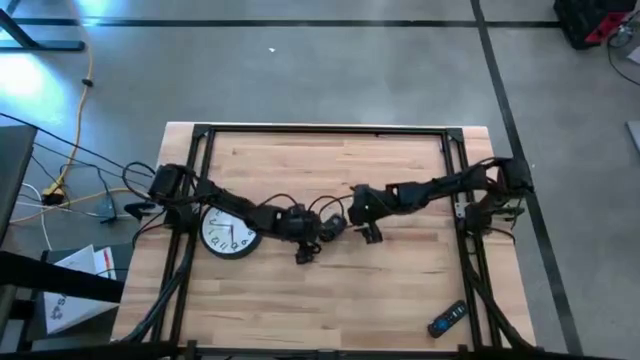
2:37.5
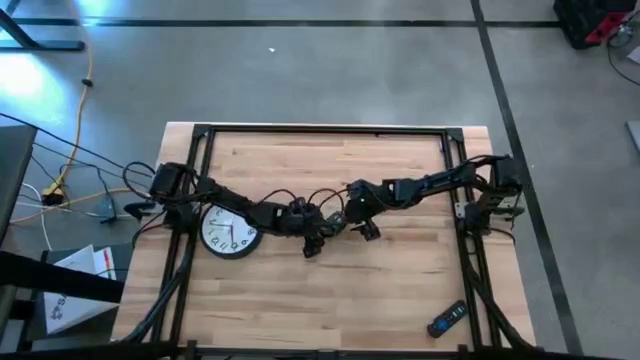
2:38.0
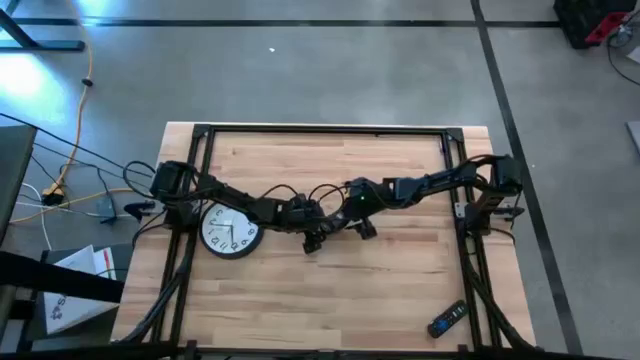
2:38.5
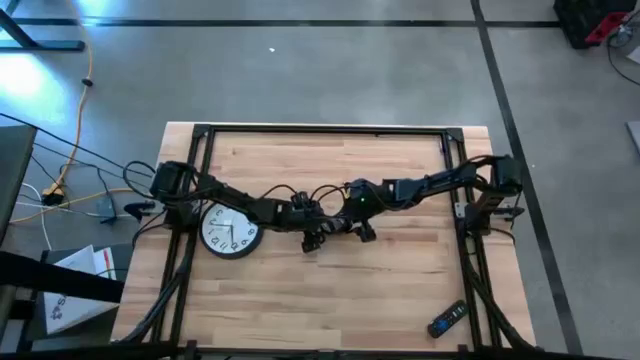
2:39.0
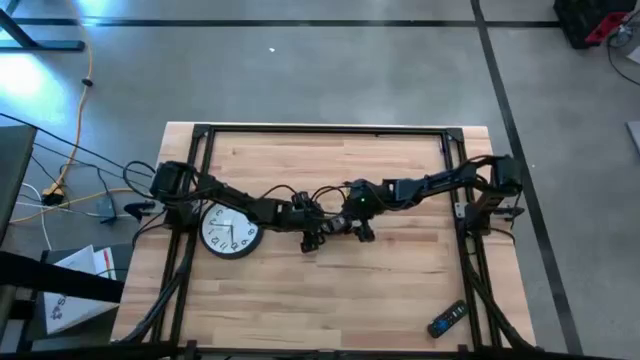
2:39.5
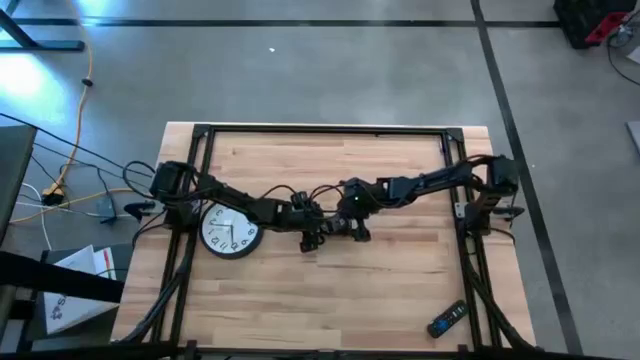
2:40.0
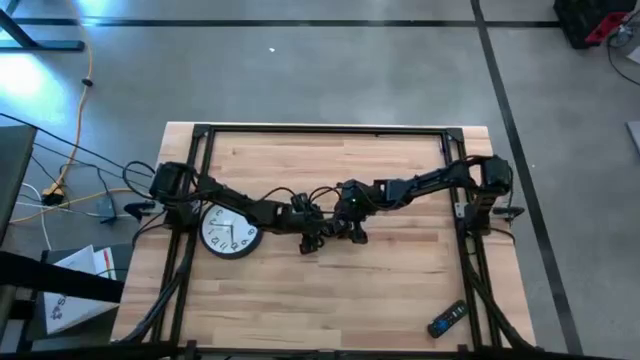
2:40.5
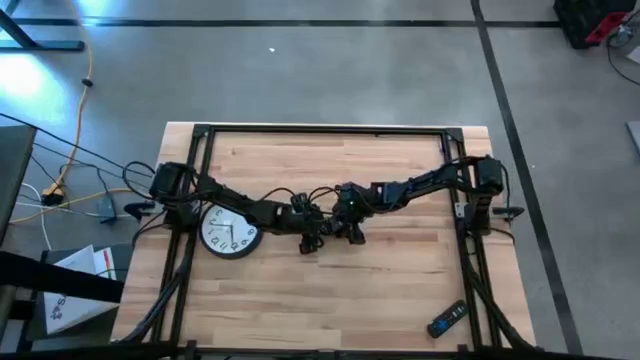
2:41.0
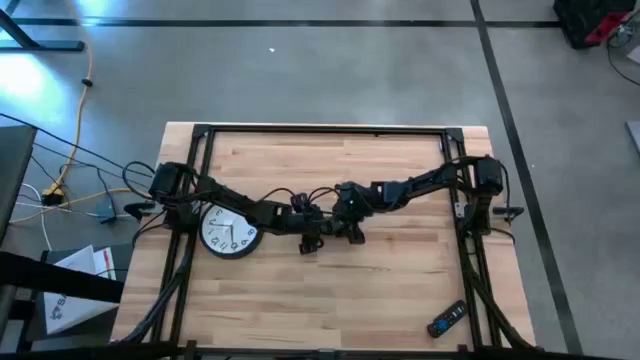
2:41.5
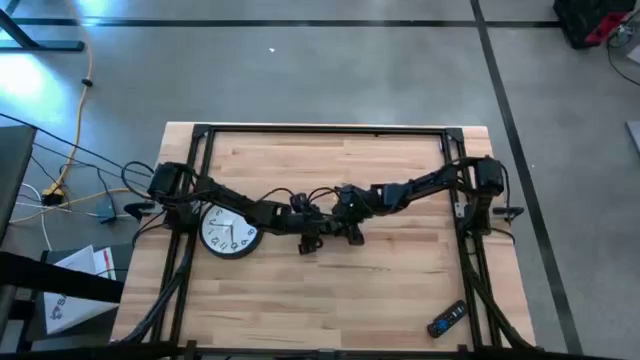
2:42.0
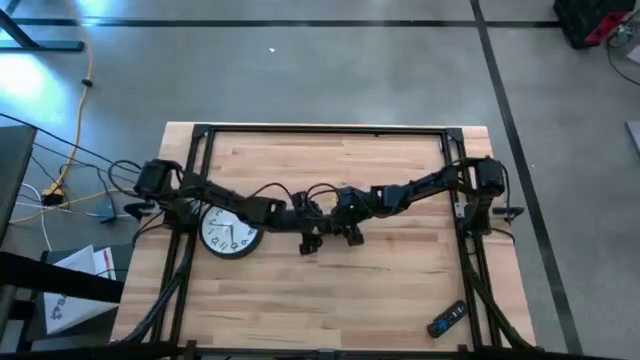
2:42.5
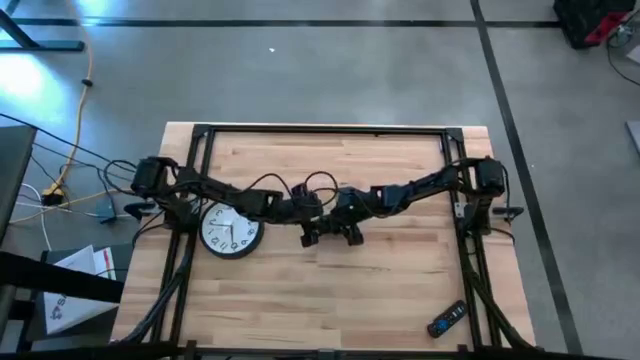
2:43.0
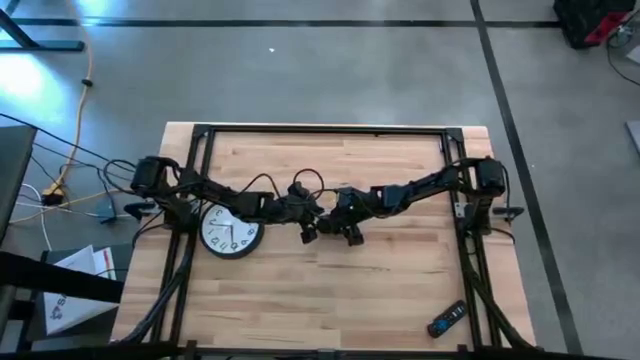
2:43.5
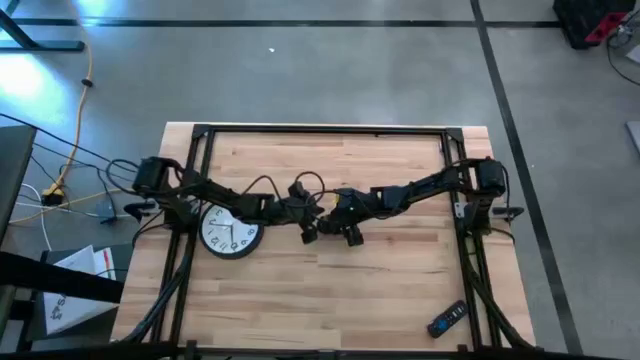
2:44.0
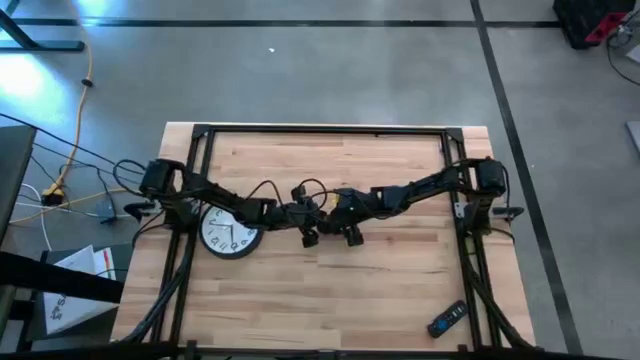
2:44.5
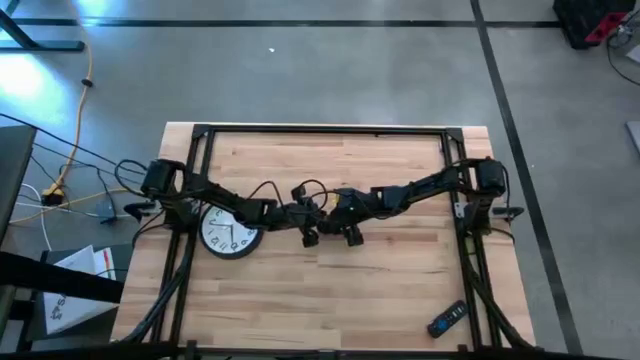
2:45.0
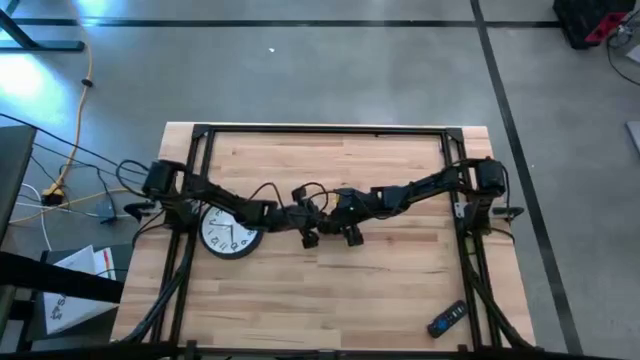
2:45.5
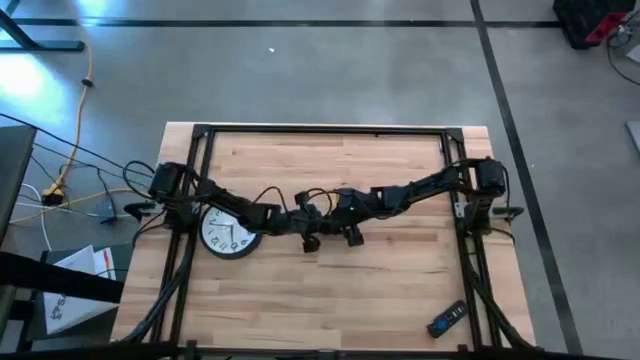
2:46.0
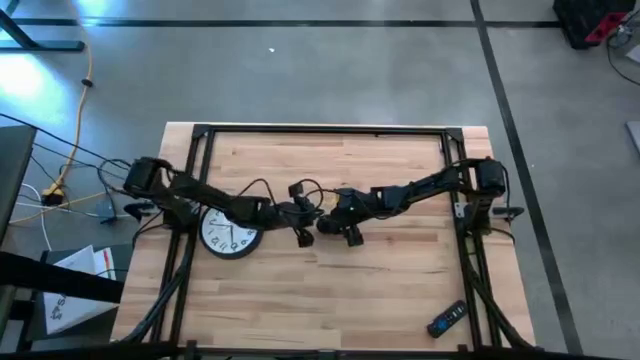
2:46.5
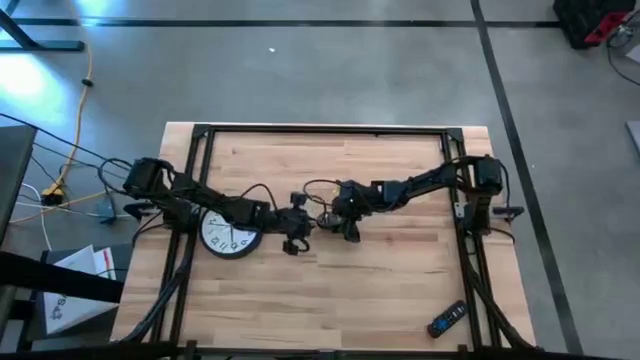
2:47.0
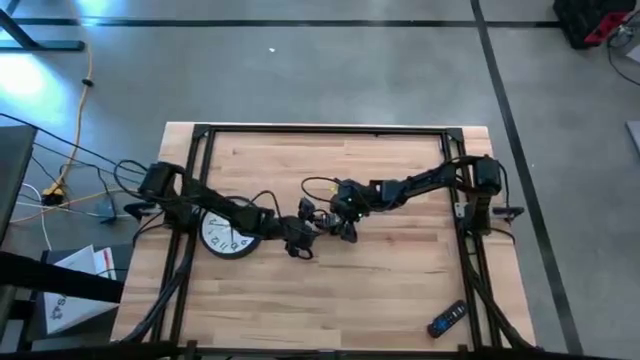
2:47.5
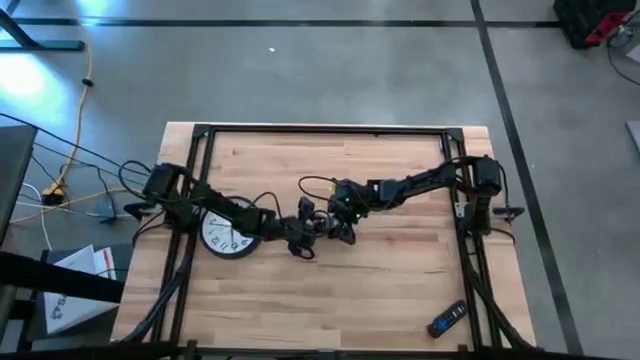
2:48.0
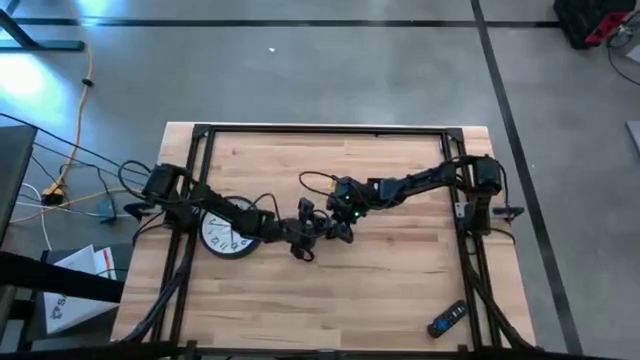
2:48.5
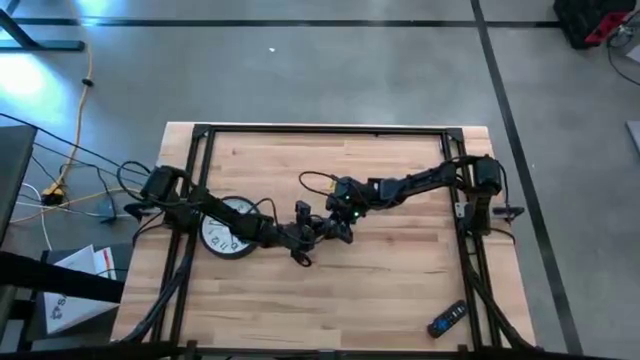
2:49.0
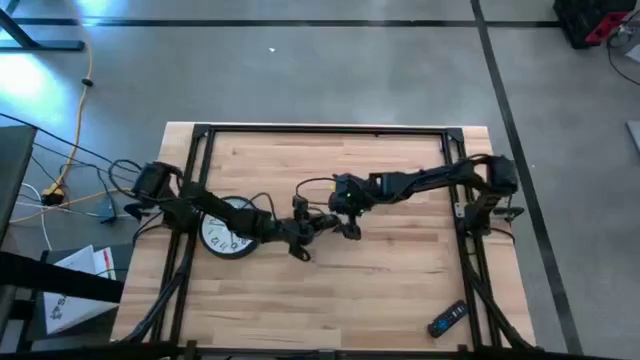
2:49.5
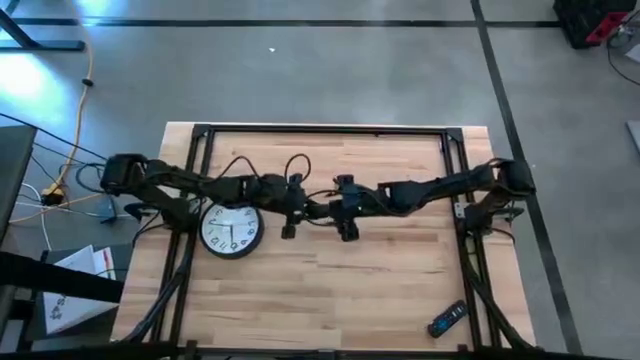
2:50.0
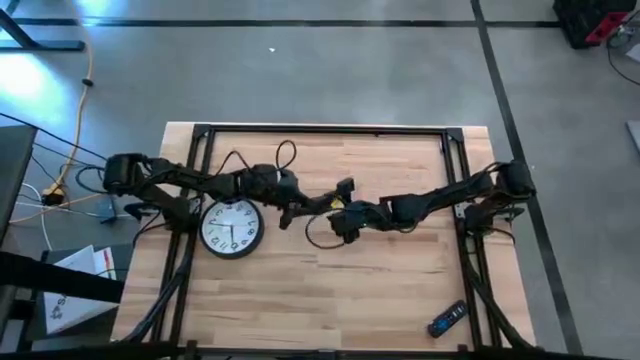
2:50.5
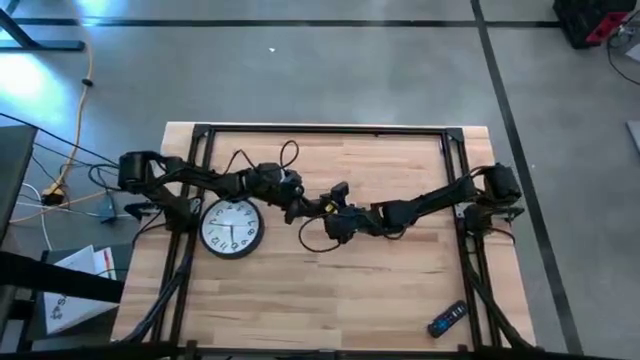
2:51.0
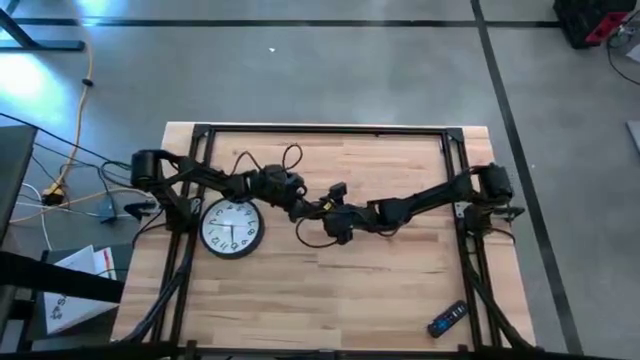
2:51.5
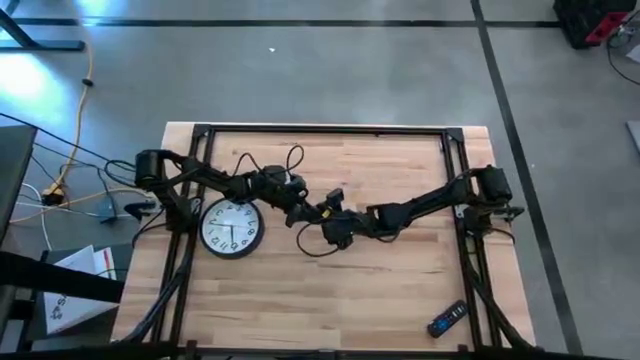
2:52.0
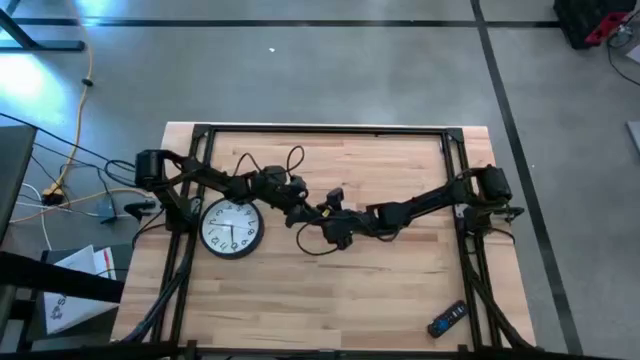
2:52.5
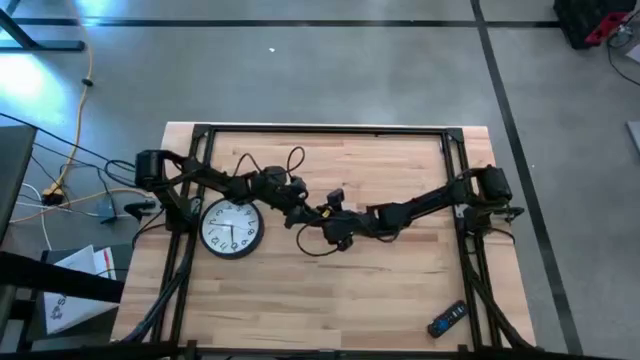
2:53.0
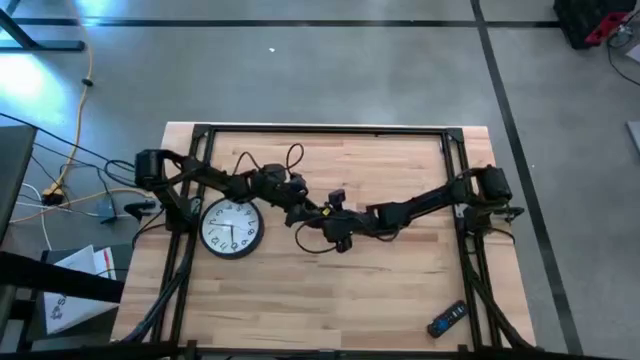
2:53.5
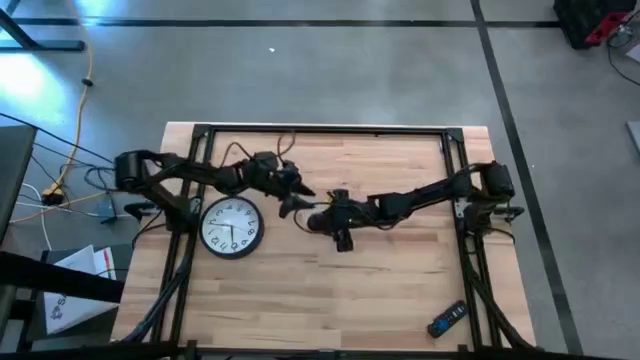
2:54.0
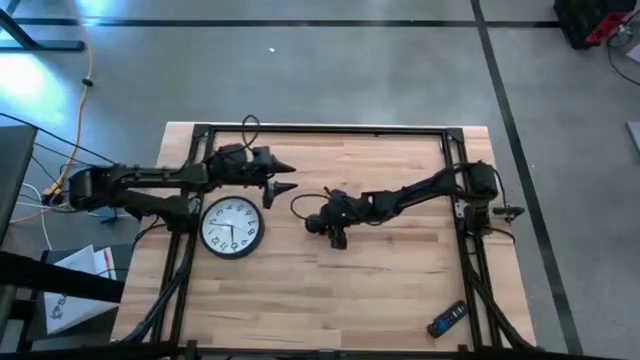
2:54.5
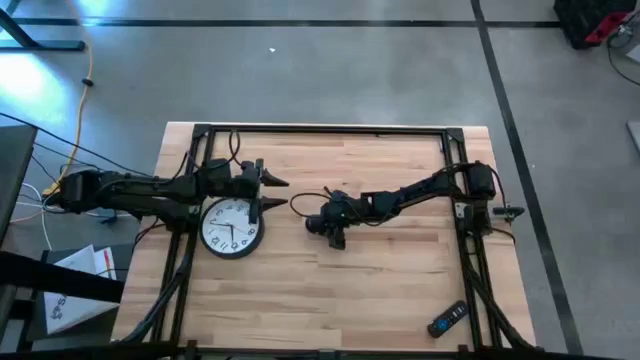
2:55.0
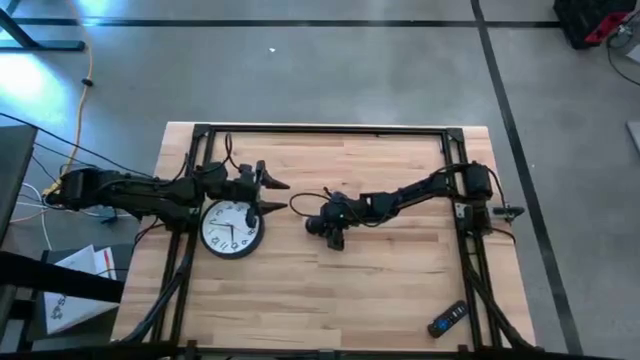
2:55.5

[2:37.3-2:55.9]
Task: Insert battery
Insert the black battery into the black computer mouse

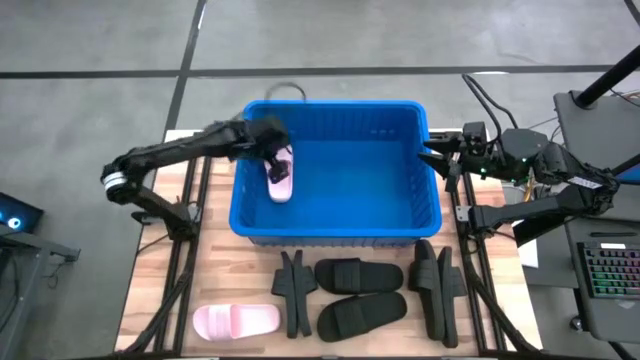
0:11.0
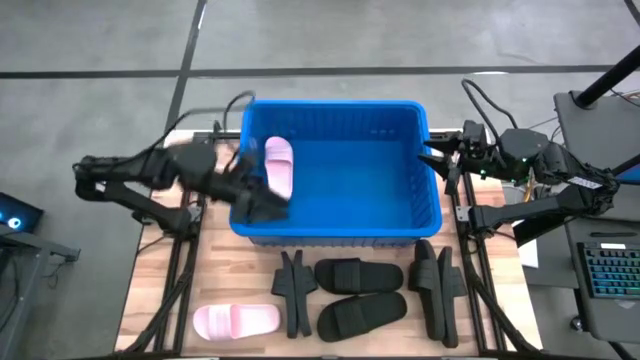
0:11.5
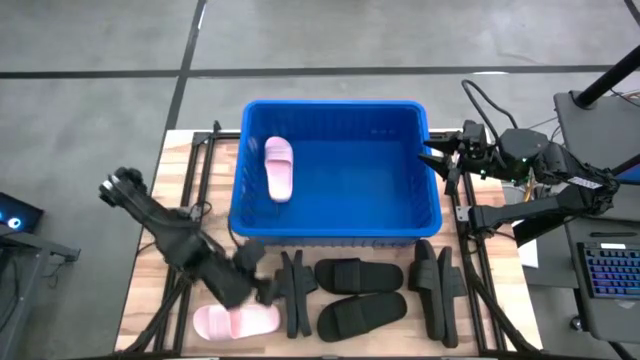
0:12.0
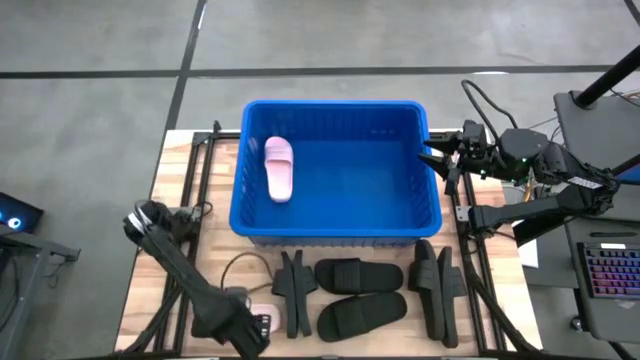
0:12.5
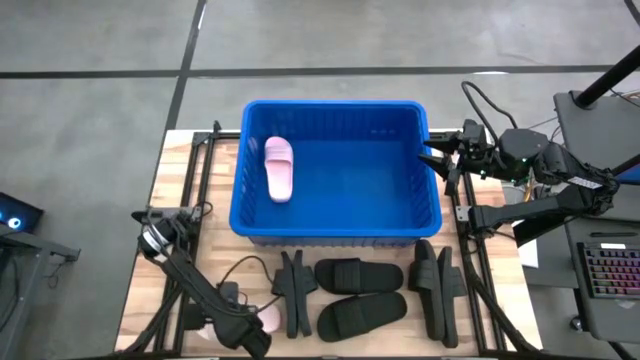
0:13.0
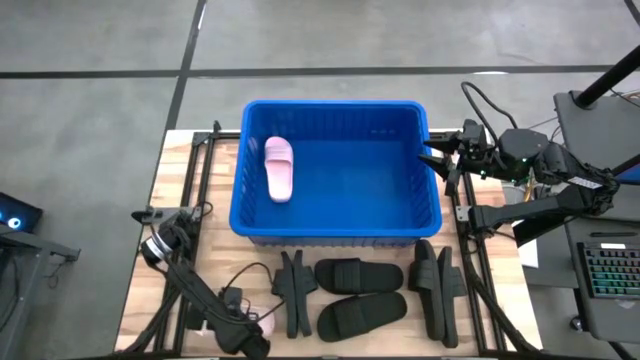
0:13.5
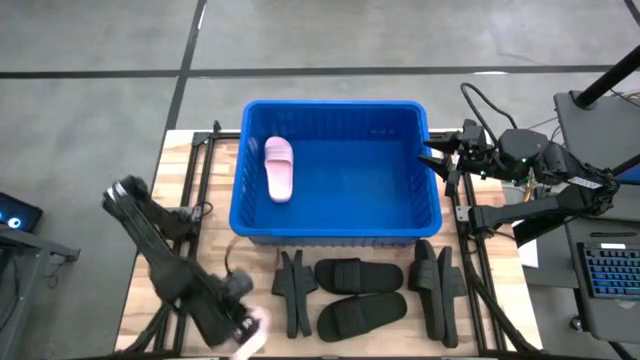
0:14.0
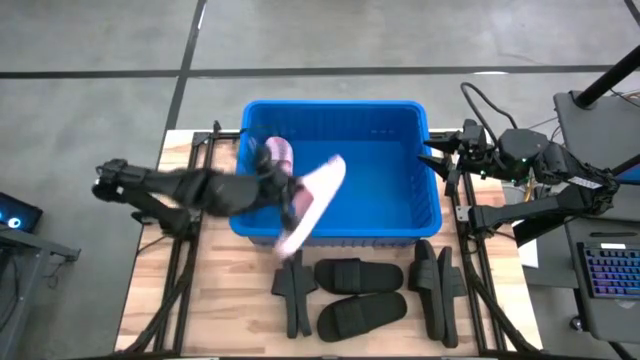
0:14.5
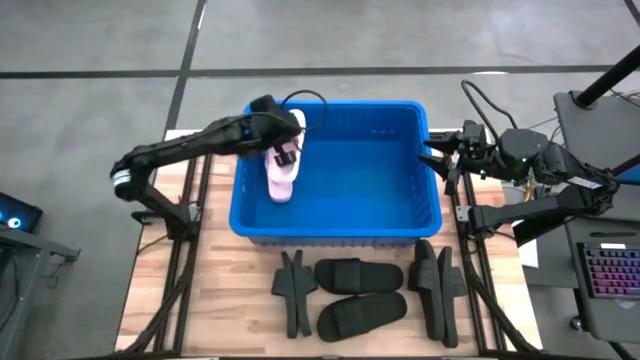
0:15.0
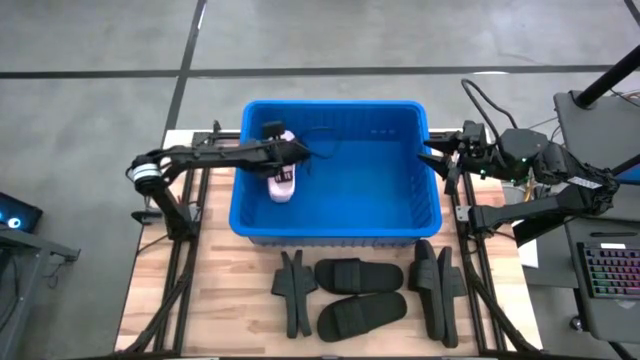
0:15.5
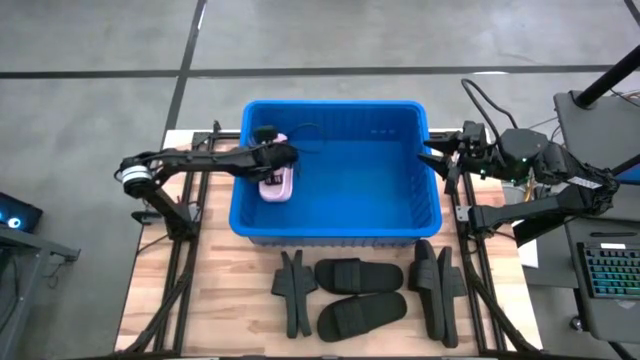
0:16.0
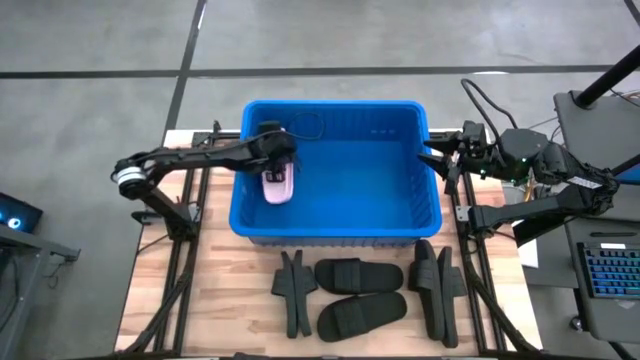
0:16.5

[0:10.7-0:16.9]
Task: Pick and place slides into bin
Put the pink slide into the bin
